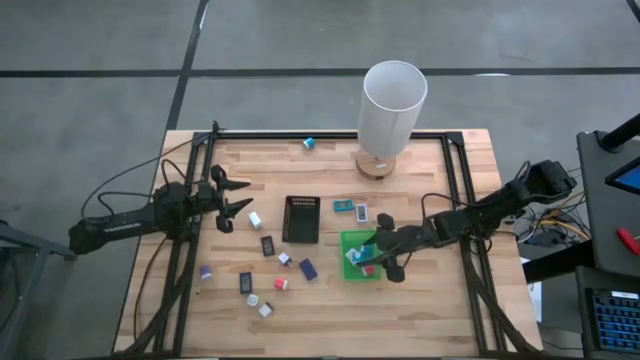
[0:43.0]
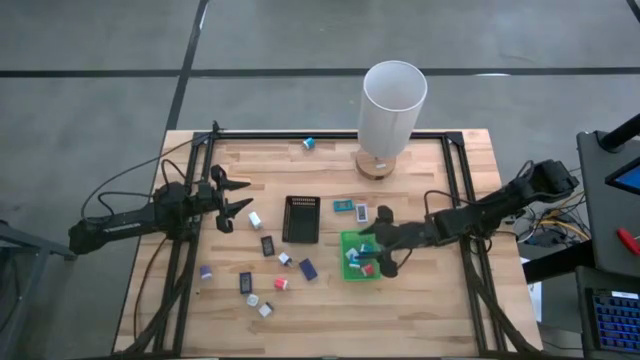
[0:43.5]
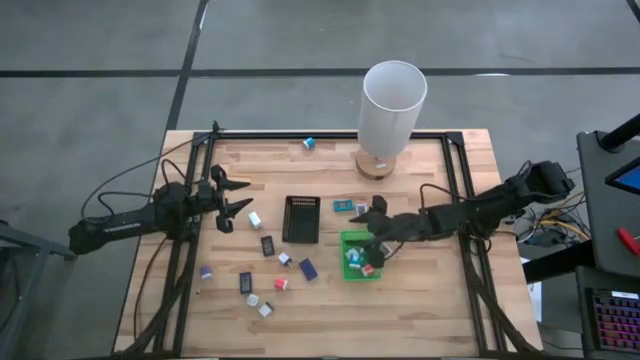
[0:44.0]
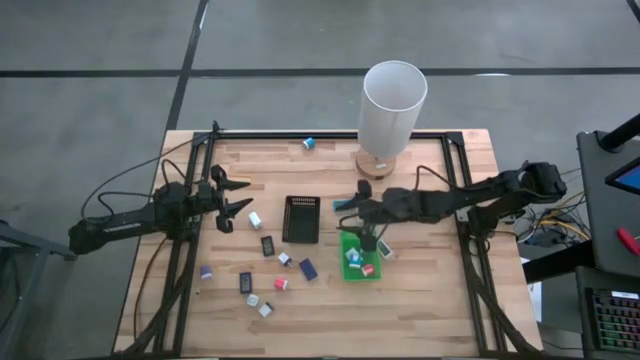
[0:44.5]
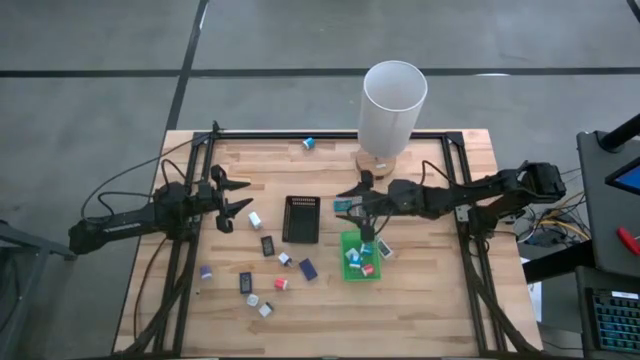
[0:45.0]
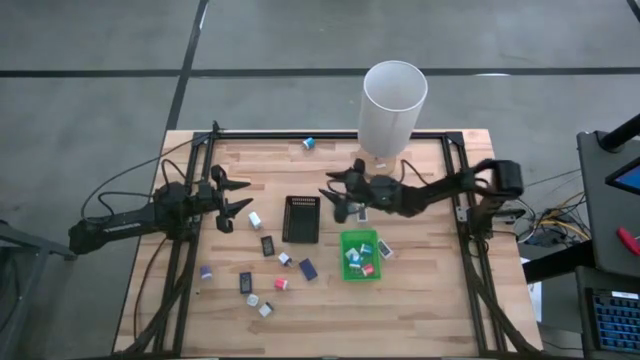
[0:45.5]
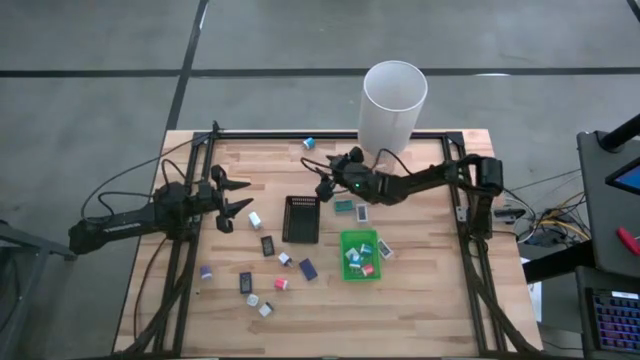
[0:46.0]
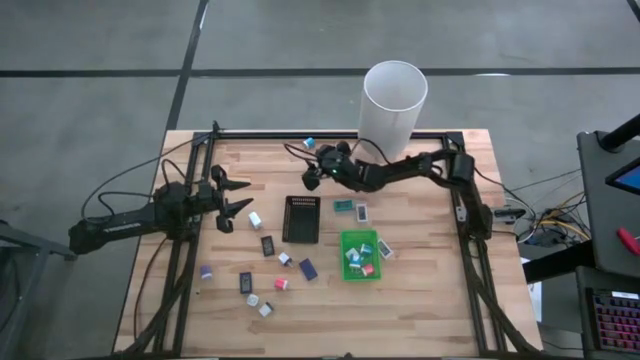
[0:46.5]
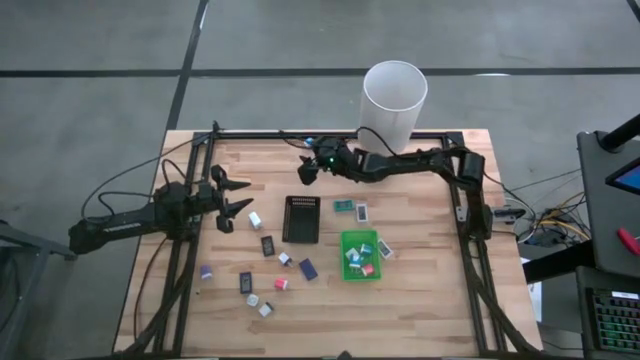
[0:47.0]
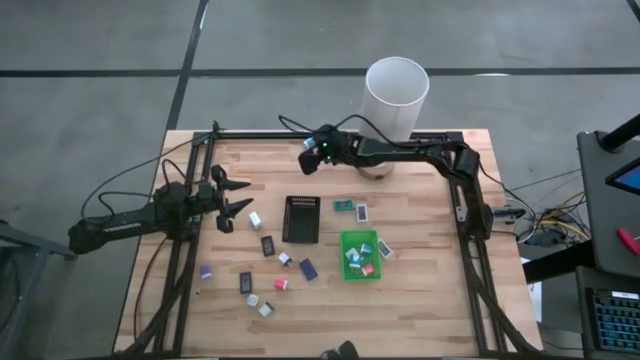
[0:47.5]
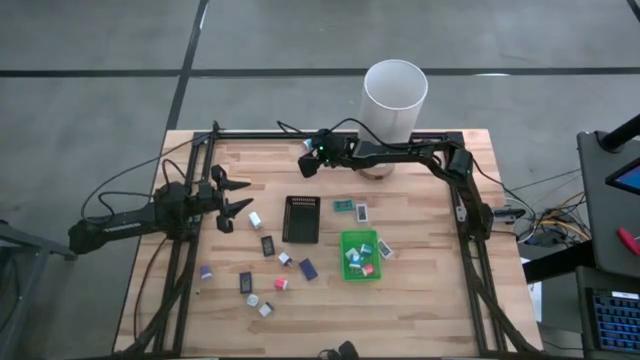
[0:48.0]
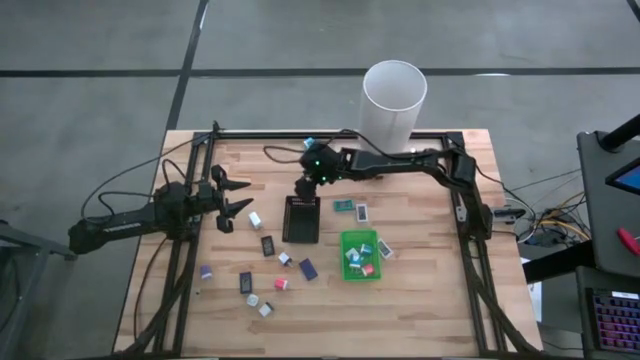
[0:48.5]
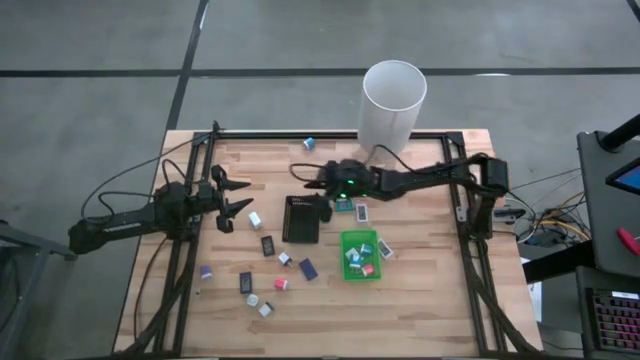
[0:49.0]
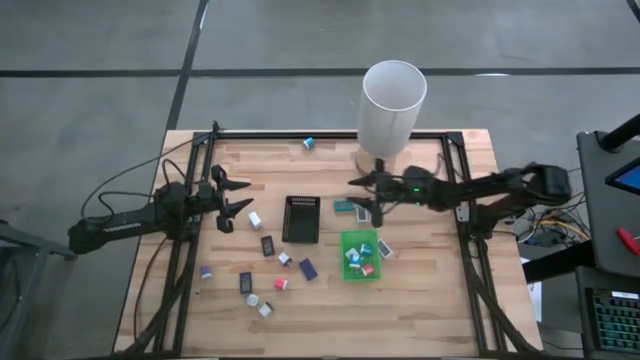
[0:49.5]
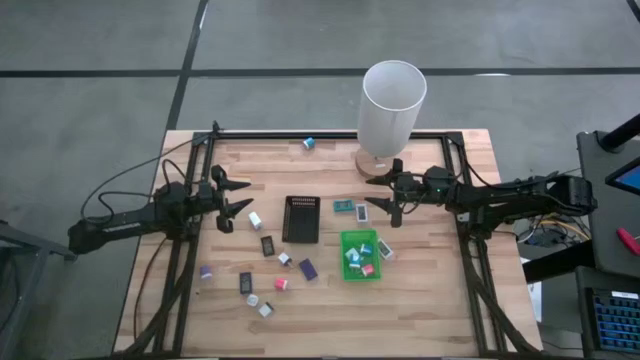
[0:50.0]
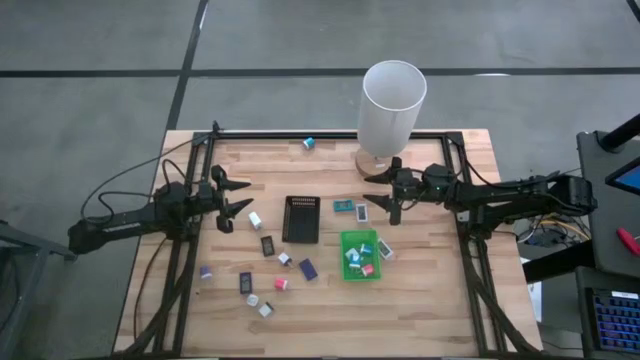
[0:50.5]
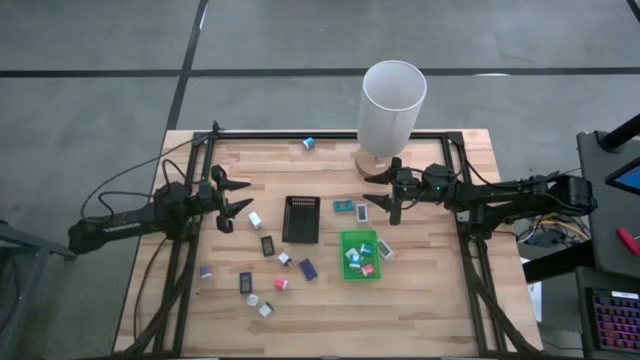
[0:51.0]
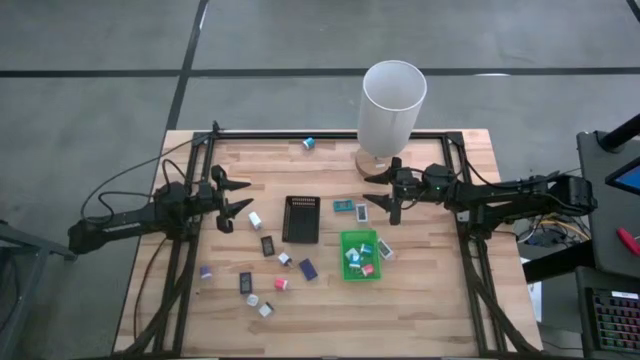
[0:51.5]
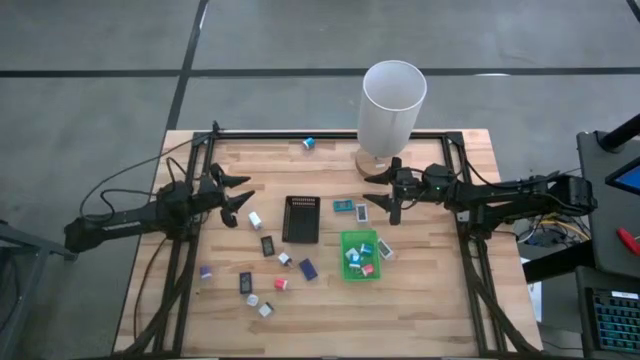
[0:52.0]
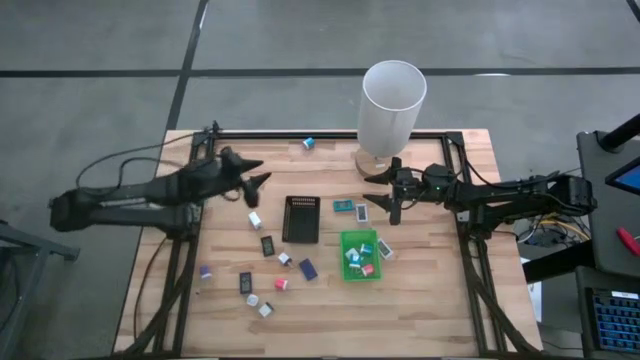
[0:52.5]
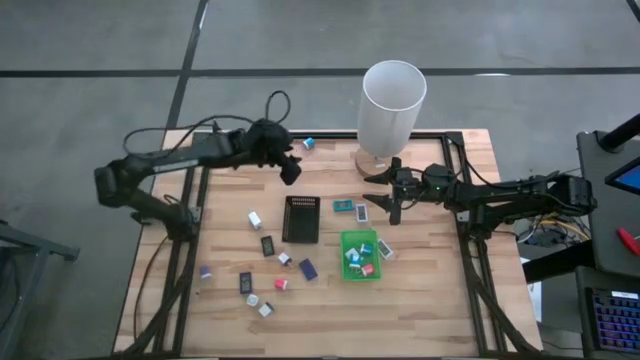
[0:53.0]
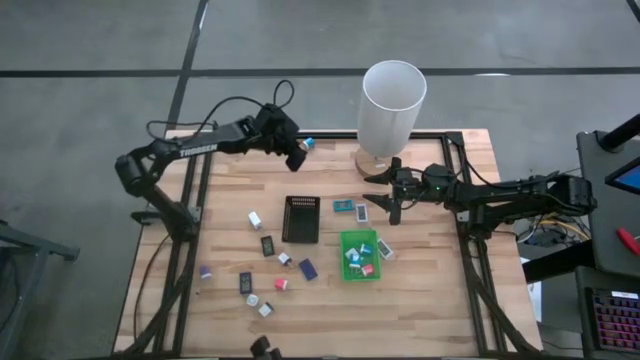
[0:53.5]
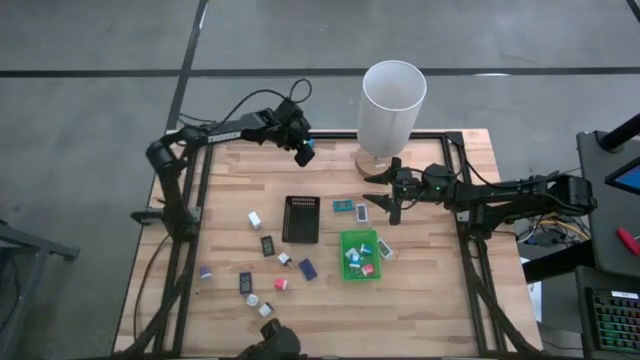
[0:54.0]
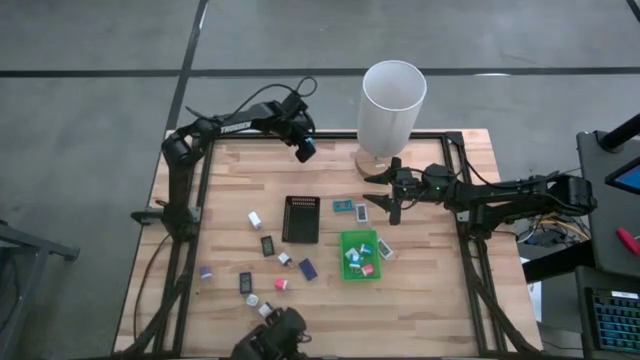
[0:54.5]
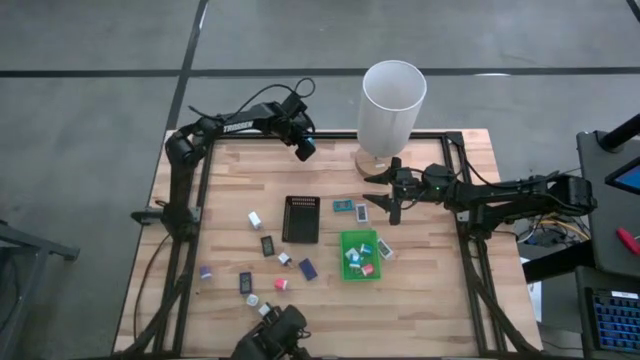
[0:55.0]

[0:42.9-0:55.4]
Task: Pick & Place Office items
Put the blue charger adapter into the green bin

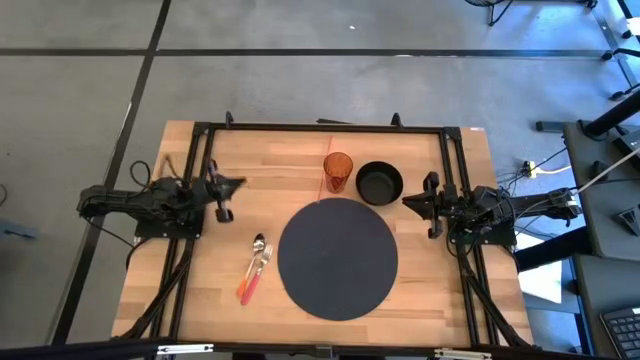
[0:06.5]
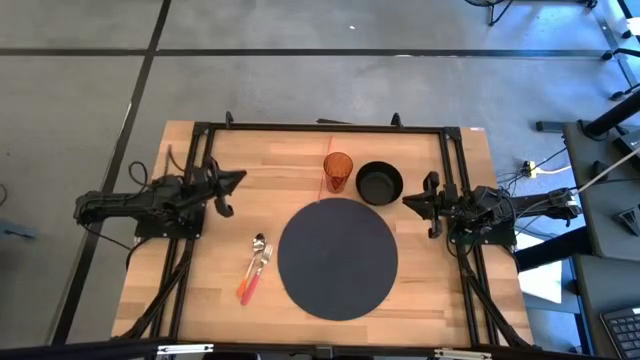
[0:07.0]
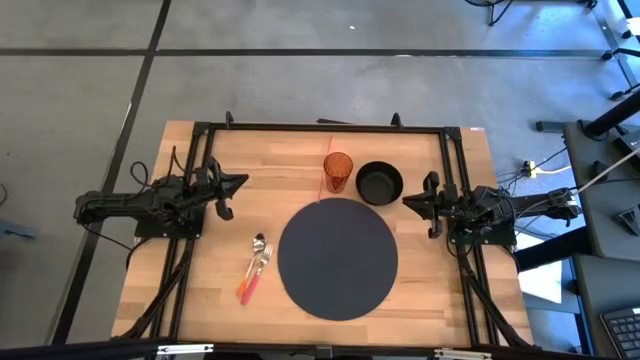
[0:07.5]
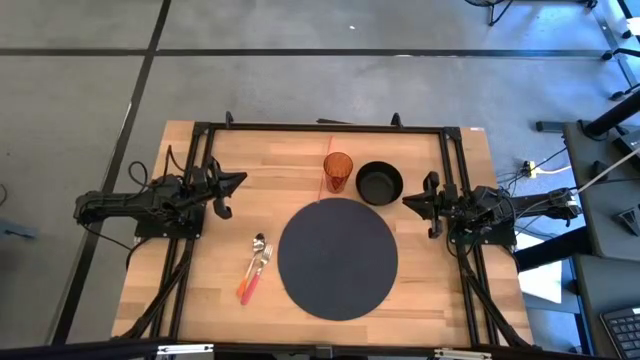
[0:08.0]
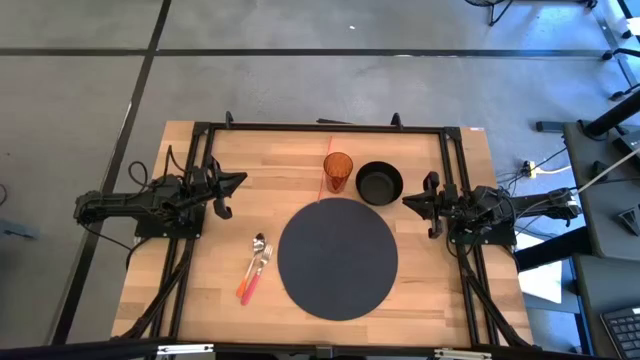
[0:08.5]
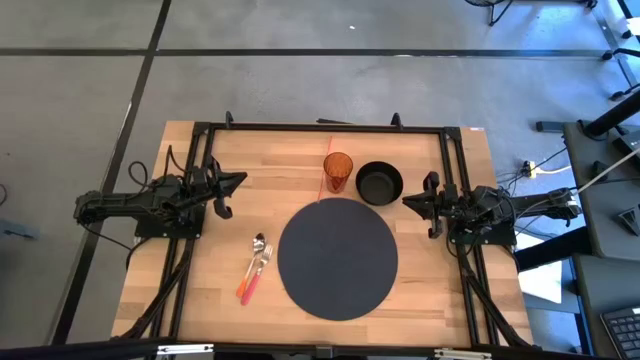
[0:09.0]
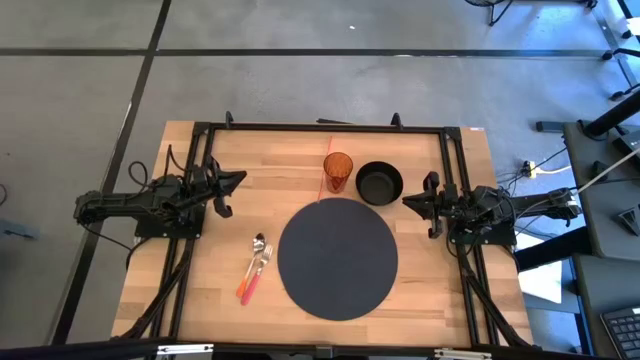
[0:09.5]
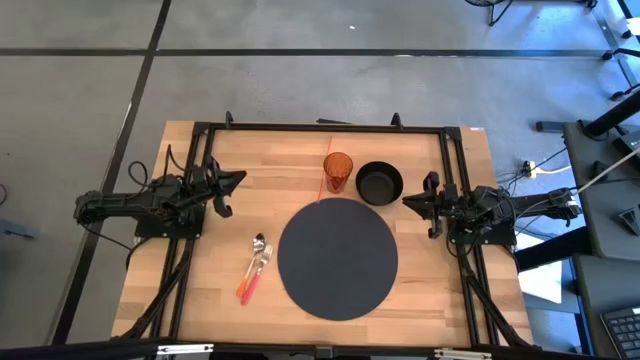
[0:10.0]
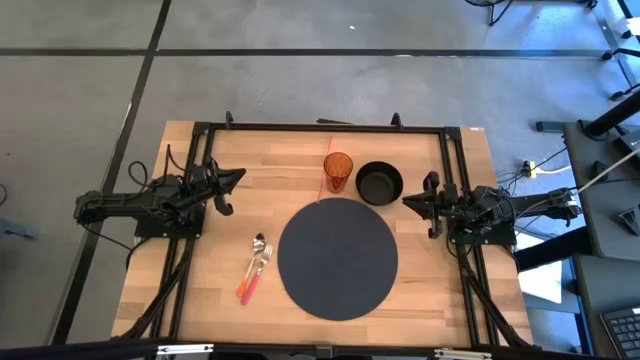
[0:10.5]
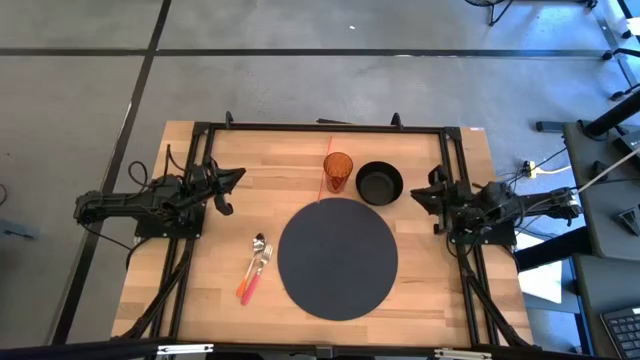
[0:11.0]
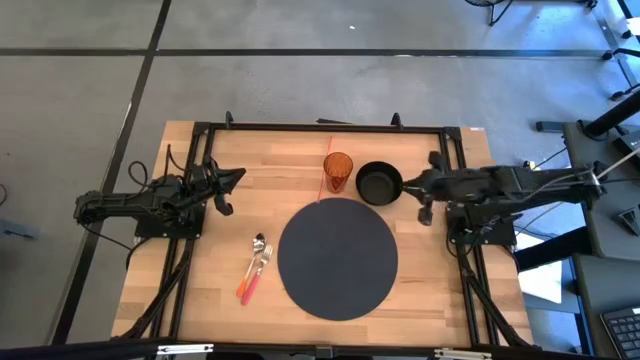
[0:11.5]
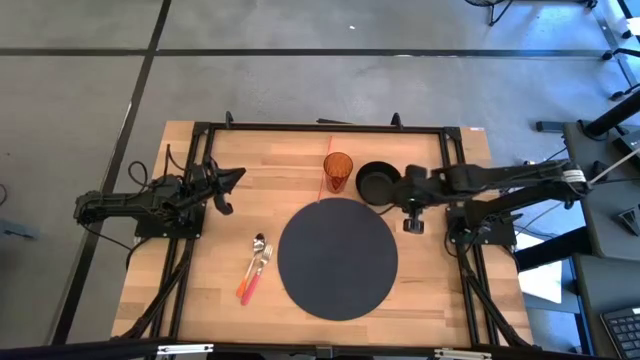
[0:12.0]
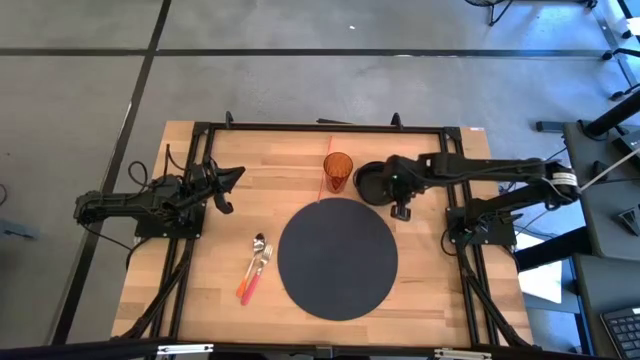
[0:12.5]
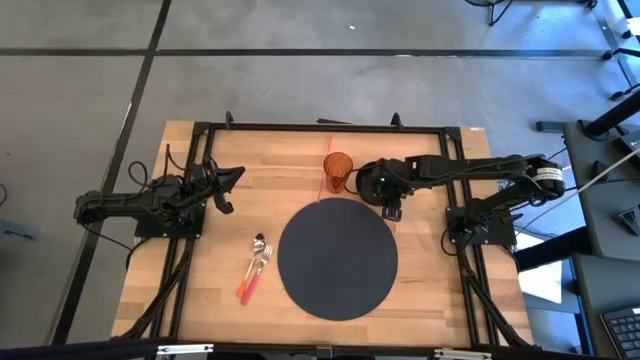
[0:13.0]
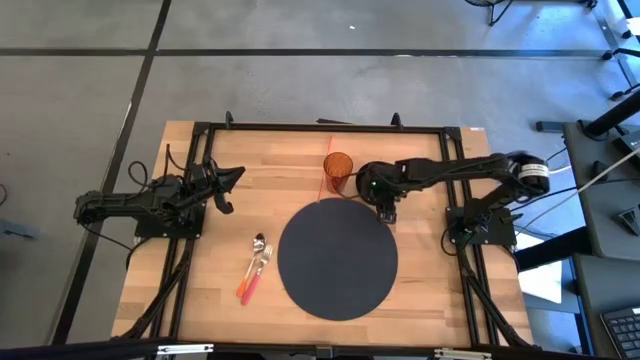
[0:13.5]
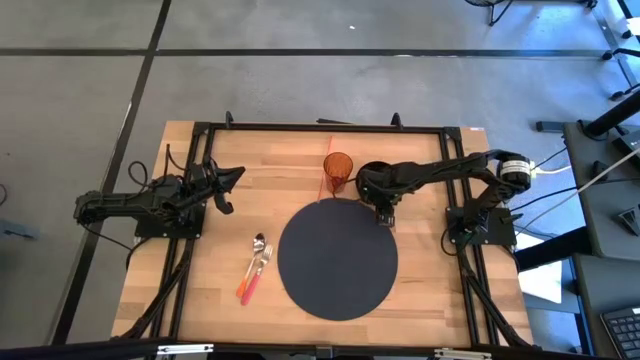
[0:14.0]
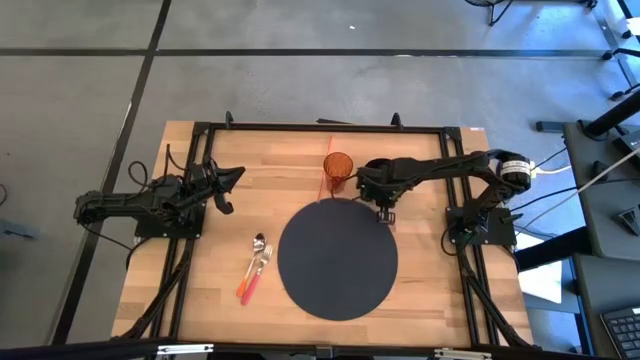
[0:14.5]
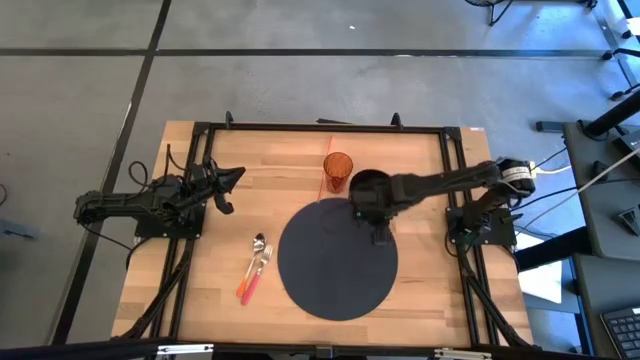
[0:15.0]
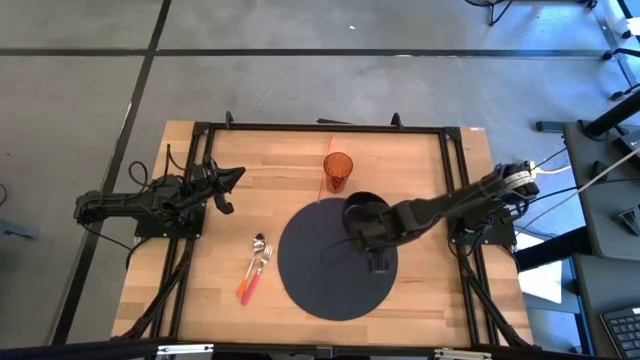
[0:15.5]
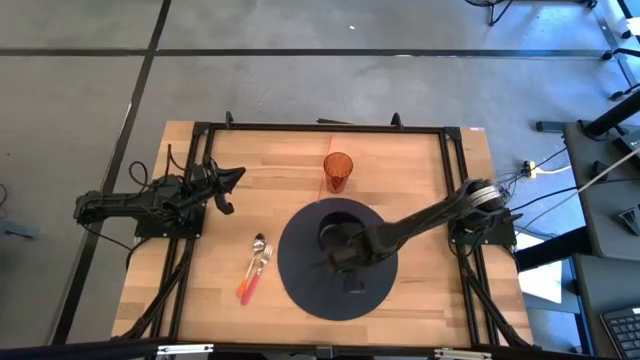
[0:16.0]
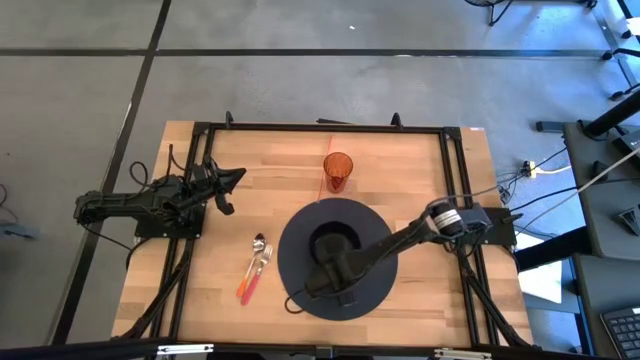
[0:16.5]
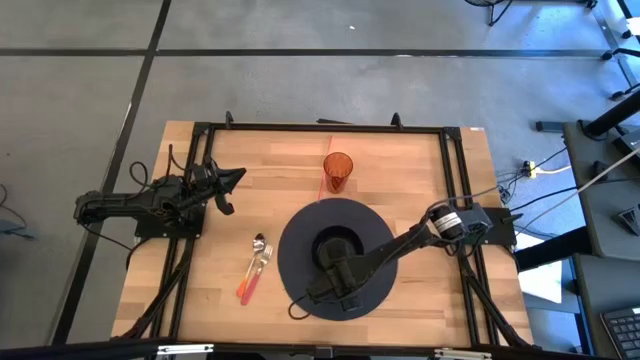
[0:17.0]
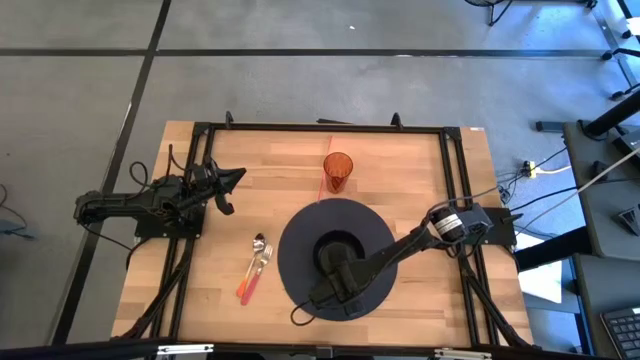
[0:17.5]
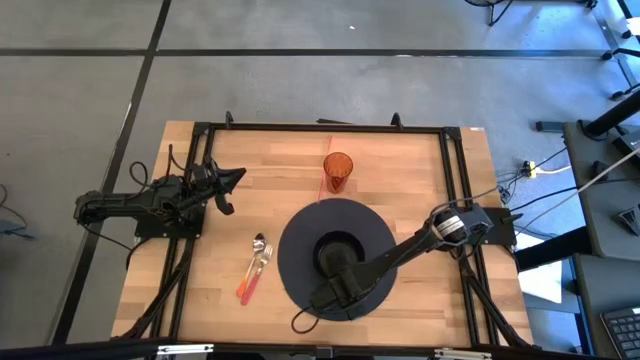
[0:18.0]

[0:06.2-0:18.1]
Task: Pick & Place Utensil
Put the black bowl on the mat
